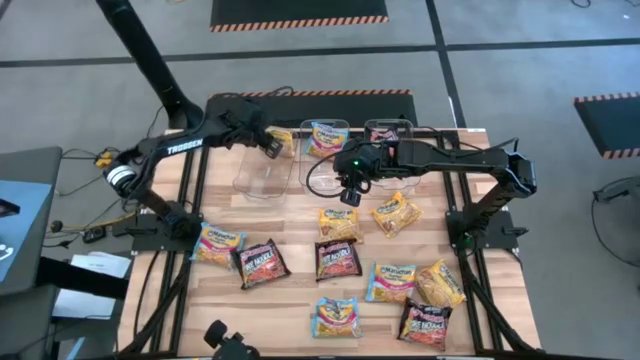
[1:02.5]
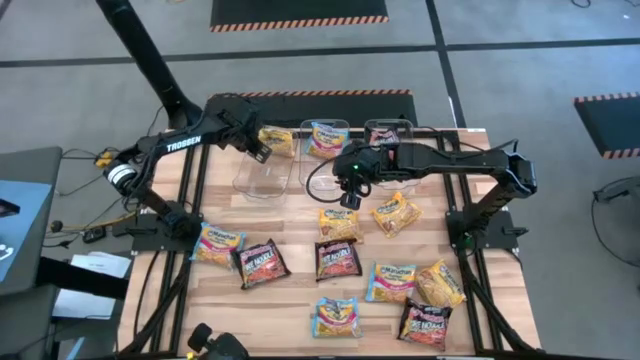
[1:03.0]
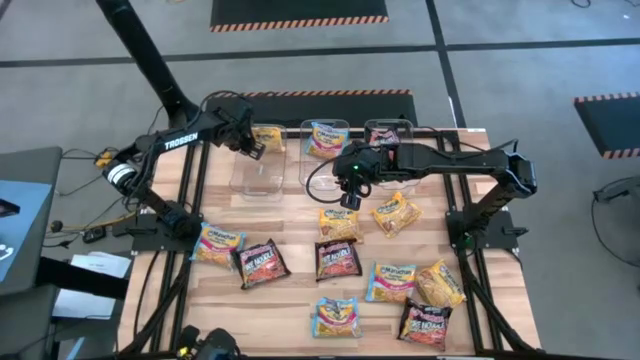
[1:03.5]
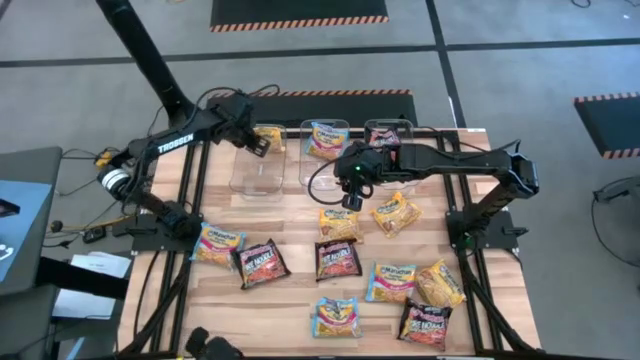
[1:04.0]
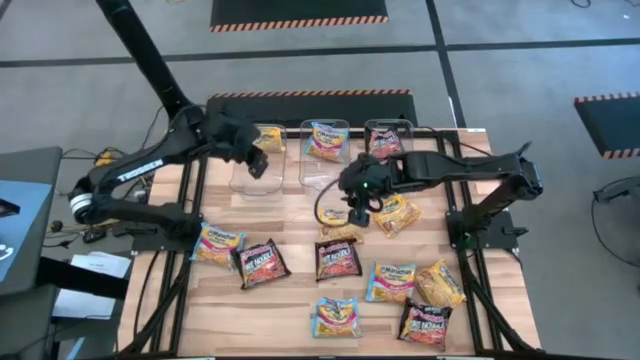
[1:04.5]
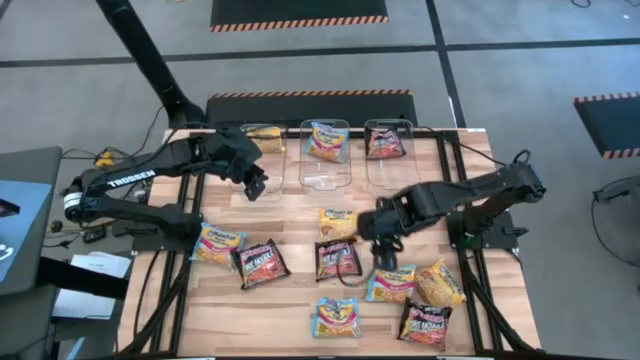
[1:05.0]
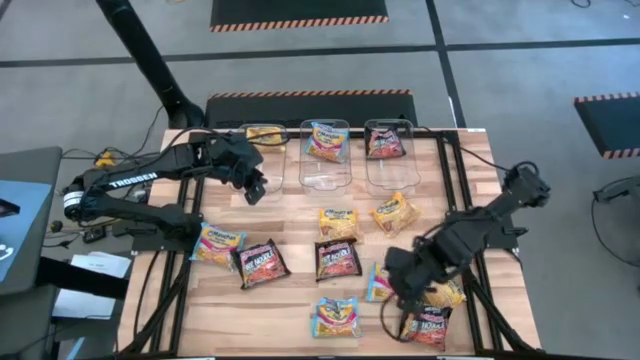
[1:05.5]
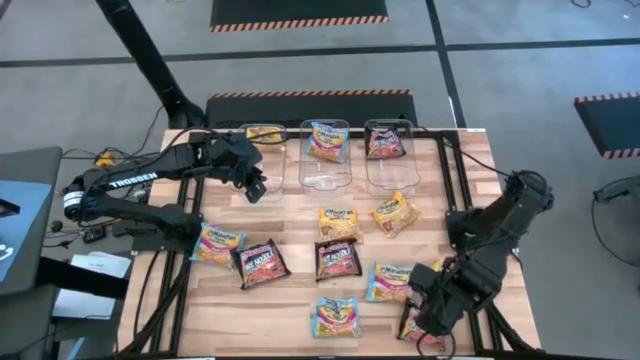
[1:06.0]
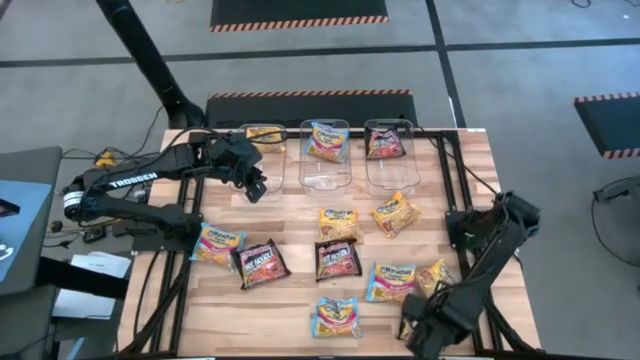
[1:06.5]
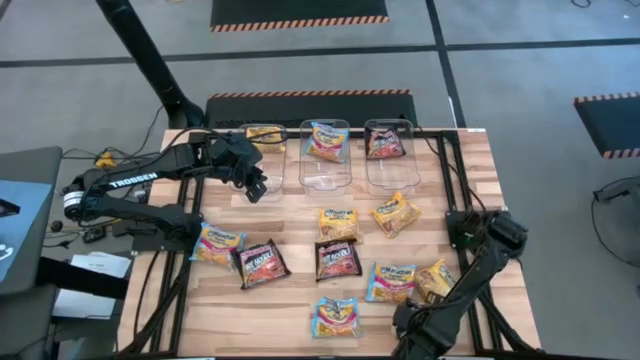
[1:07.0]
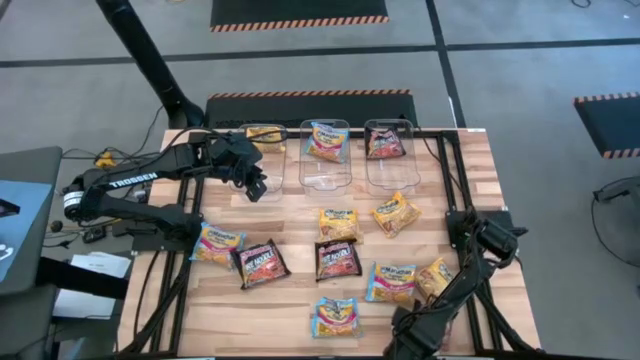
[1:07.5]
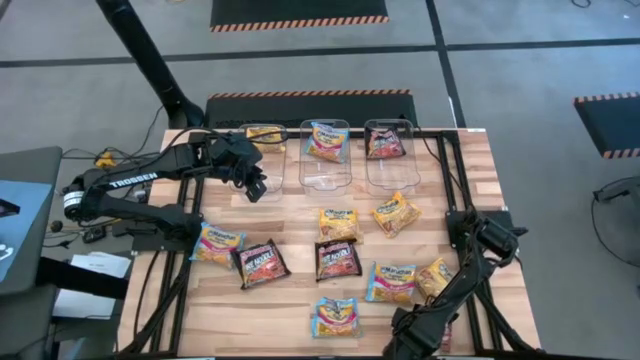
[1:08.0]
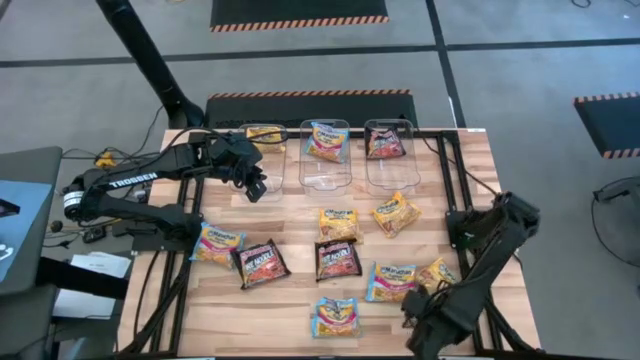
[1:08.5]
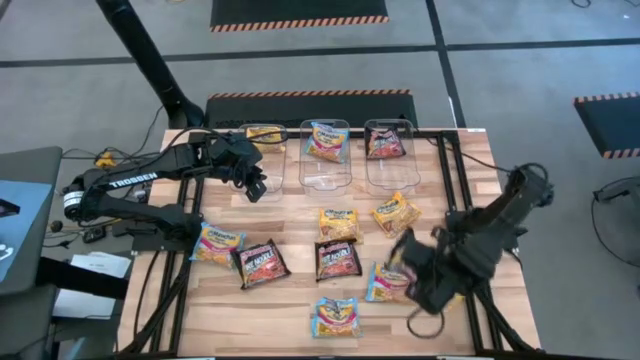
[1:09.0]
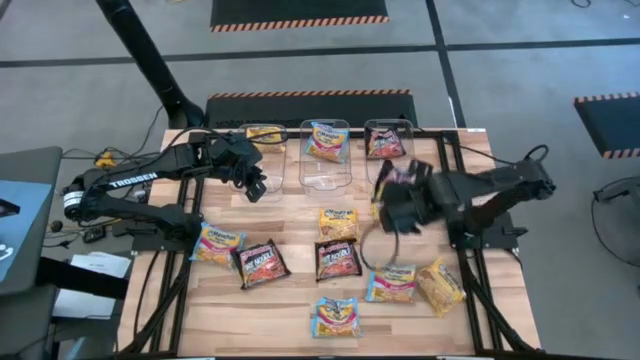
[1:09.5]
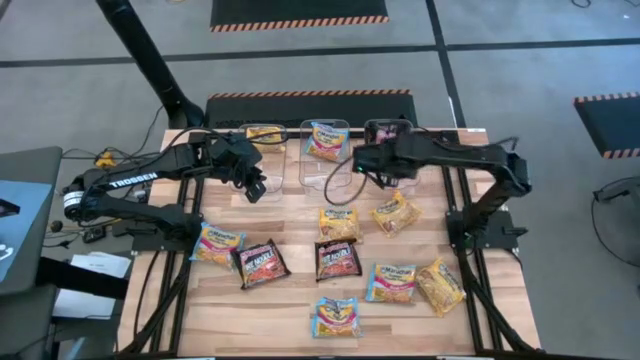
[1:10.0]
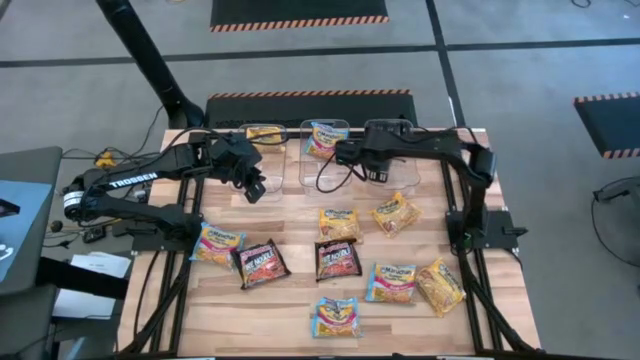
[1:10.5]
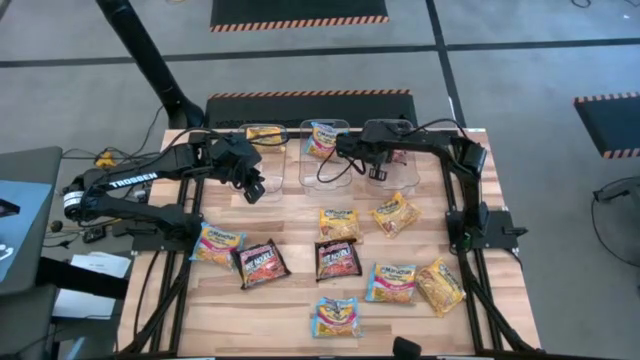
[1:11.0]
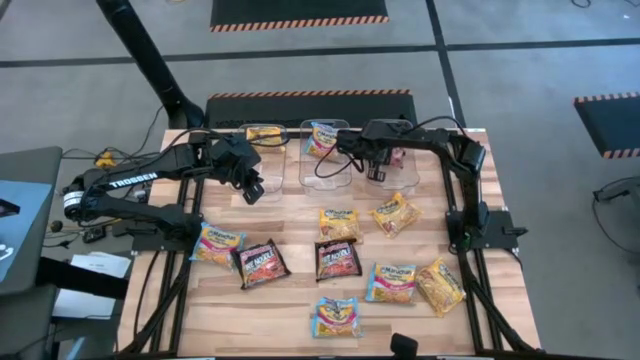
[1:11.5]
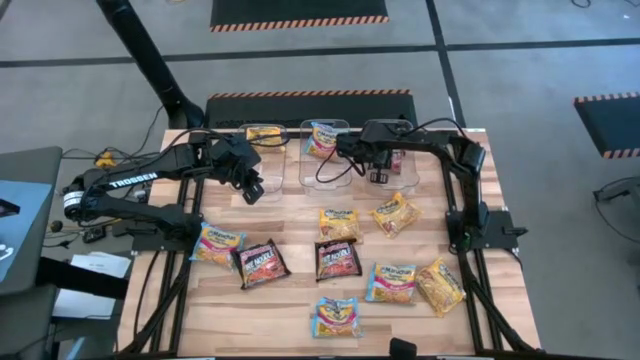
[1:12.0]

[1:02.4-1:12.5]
Task: Sort Maruchan noodles
Put the black noodle pack into the right transparent bin

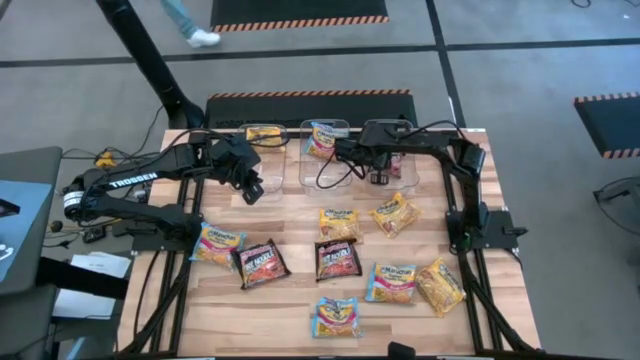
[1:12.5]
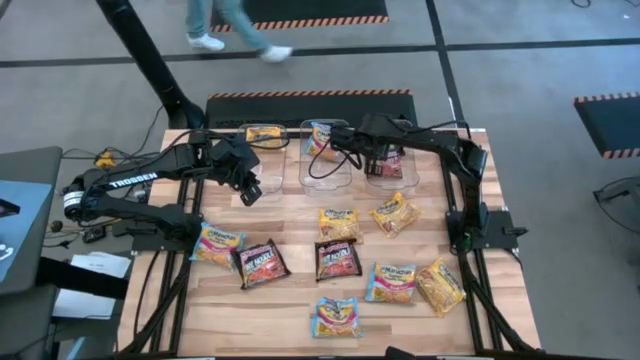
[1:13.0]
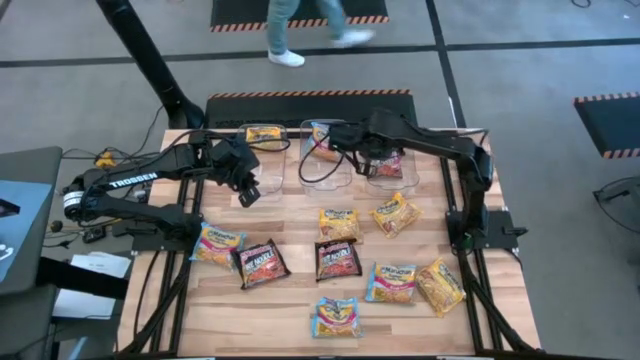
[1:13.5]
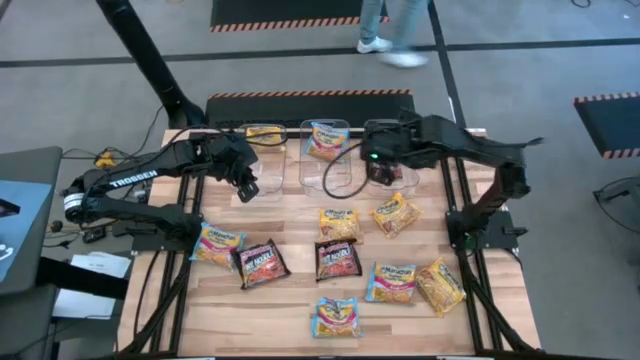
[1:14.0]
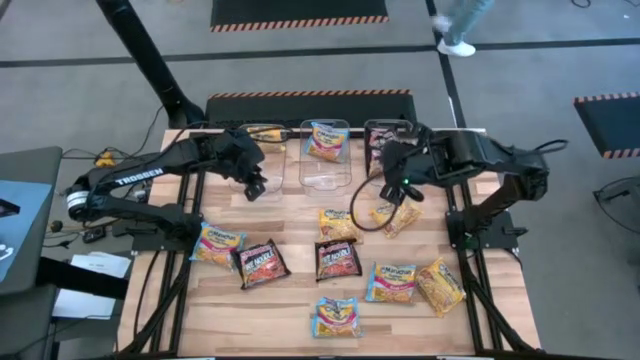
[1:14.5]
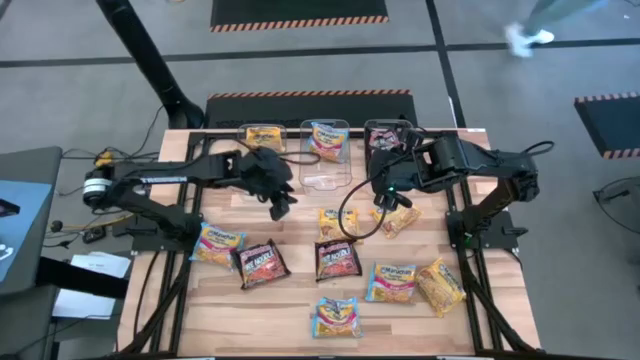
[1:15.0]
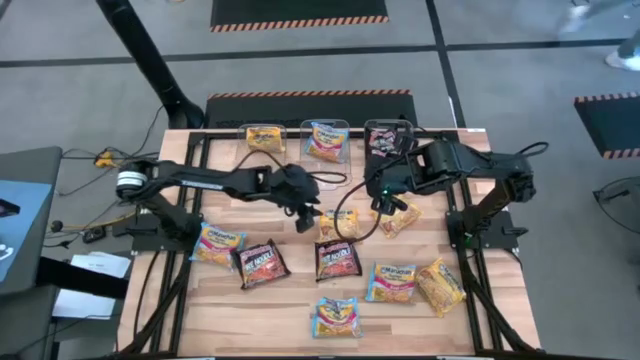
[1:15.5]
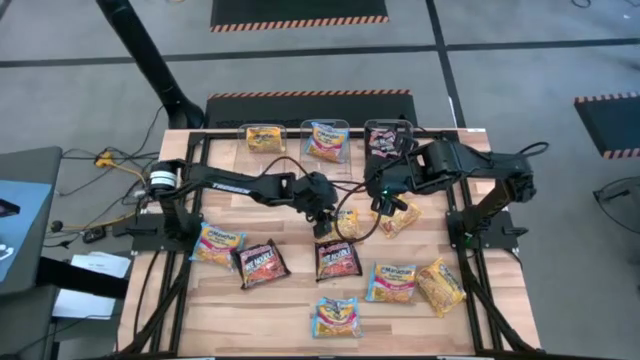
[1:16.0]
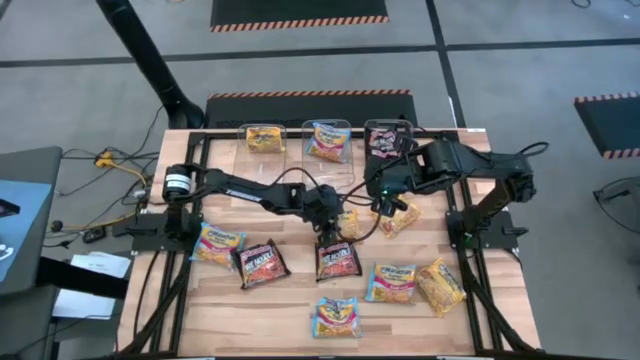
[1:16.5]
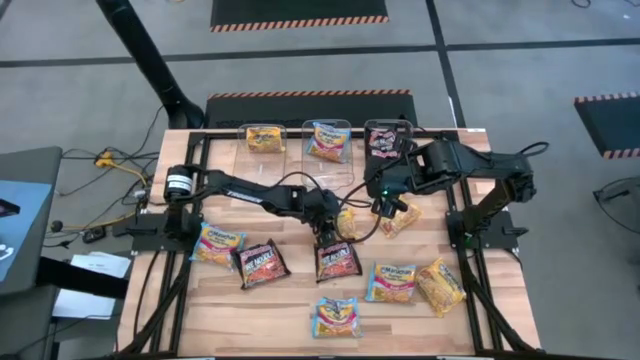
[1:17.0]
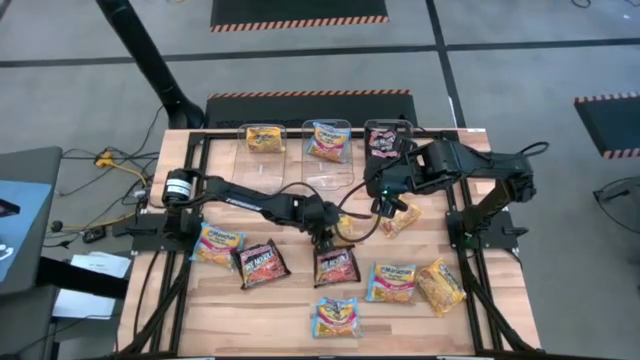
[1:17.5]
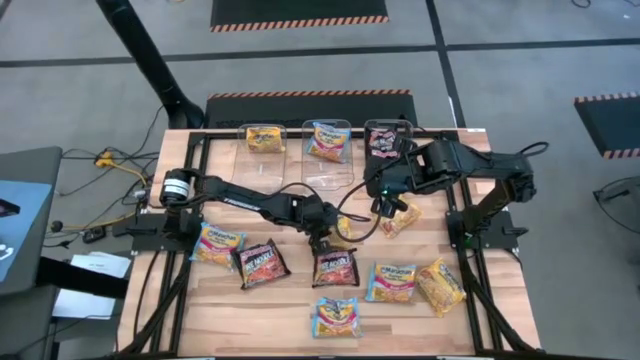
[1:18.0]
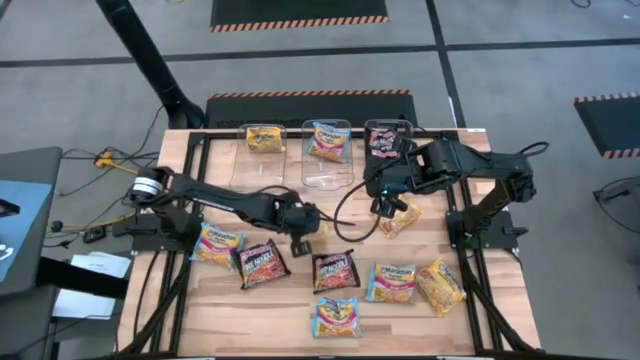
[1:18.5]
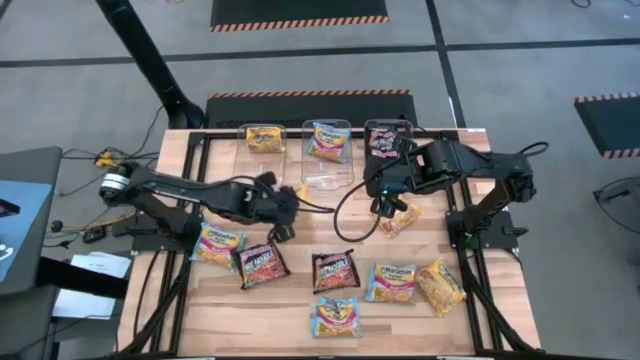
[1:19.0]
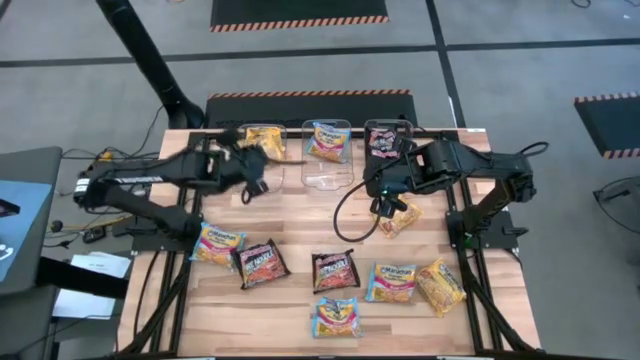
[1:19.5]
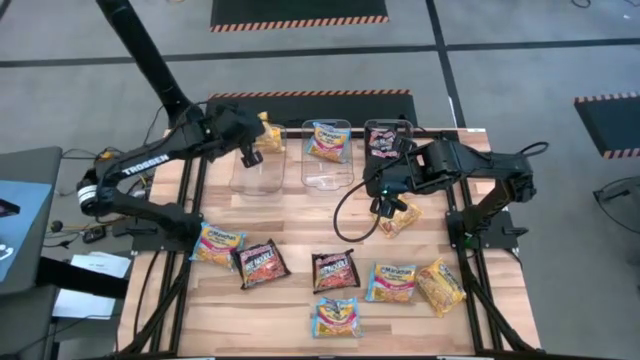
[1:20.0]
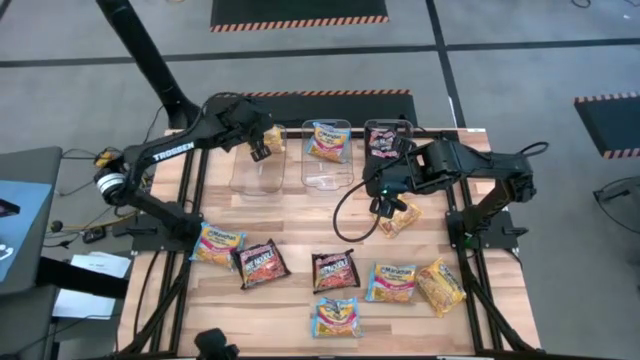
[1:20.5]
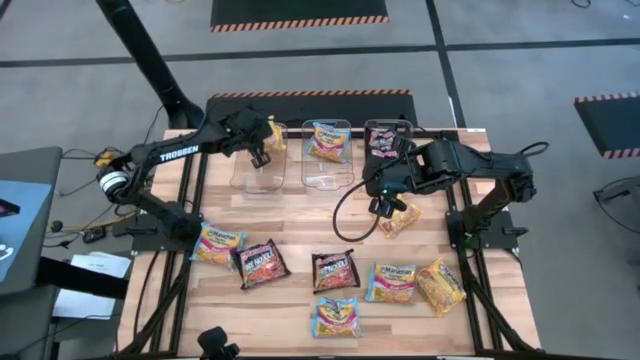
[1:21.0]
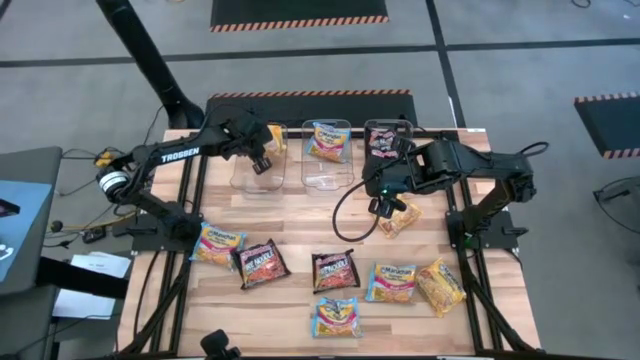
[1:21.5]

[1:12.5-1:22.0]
Put the yellow noodle pack into the left transparent bin

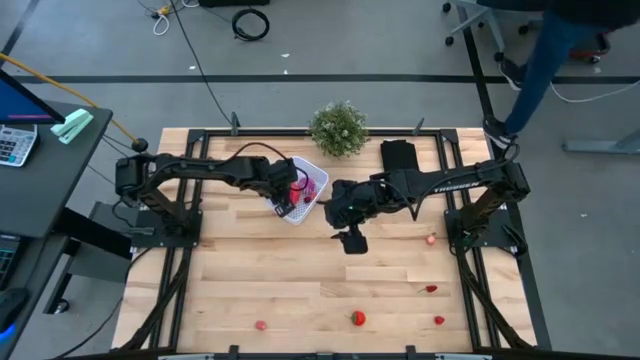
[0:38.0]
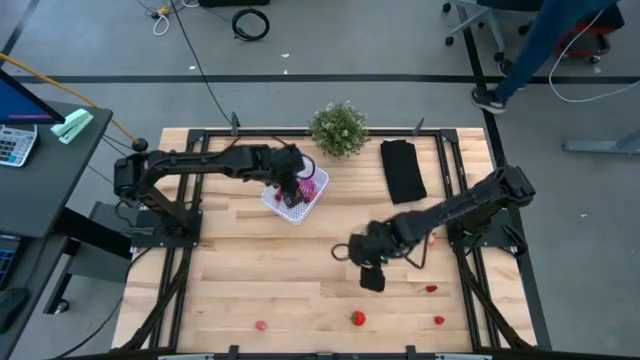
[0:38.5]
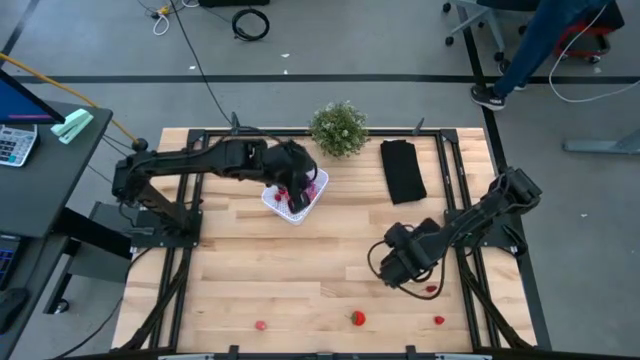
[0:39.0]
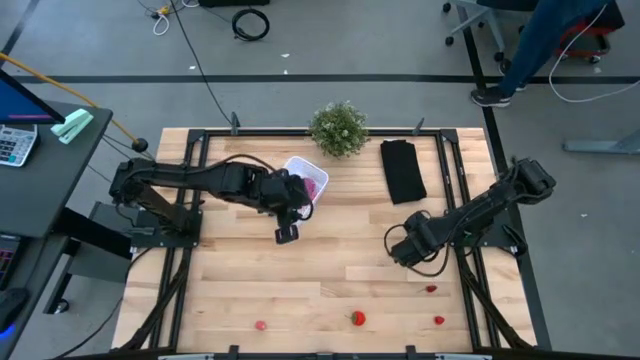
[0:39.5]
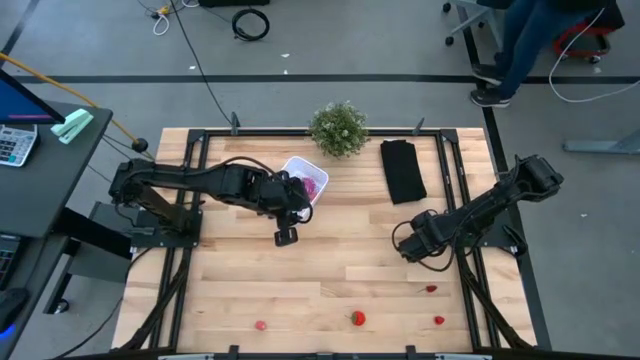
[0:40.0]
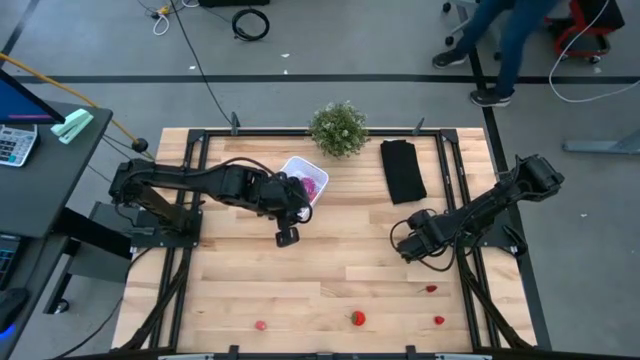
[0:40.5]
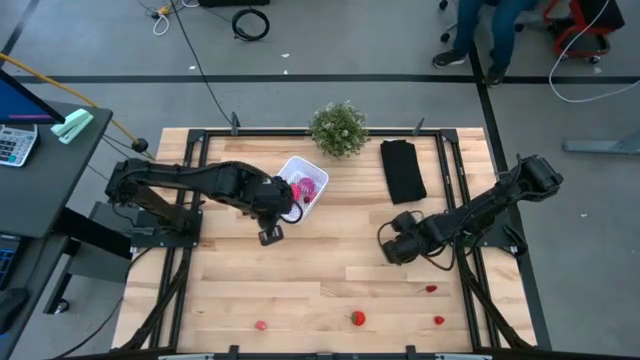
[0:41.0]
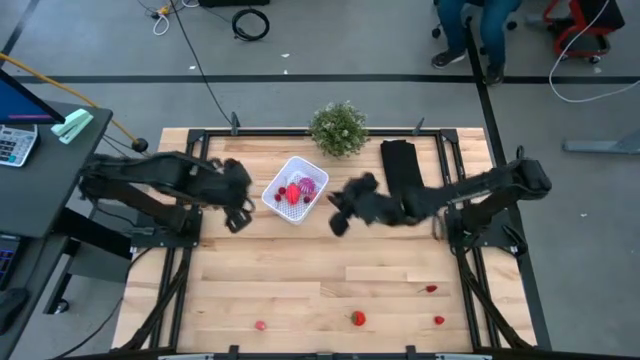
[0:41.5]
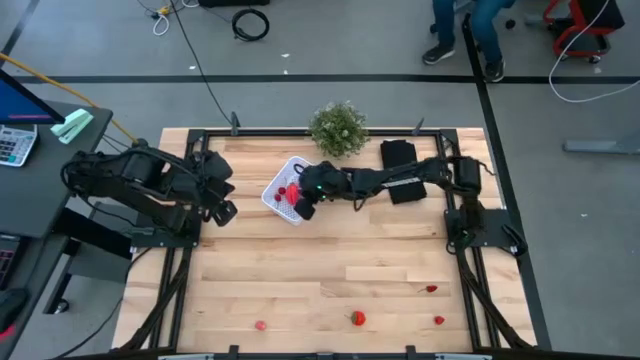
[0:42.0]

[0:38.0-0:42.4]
Task: Pick and placing Produce into tupperware
Put the pink peach into the white basket
